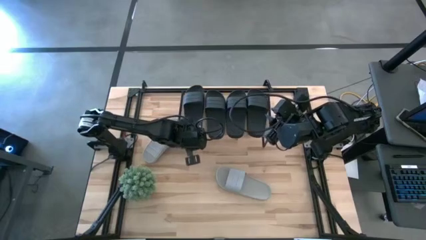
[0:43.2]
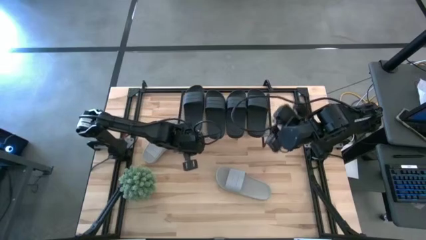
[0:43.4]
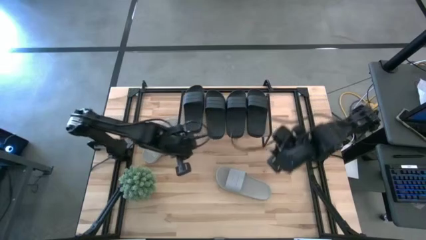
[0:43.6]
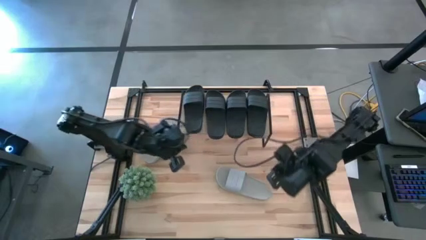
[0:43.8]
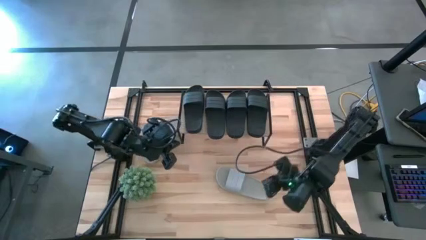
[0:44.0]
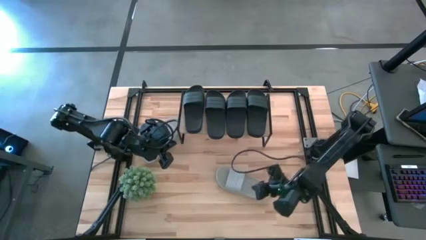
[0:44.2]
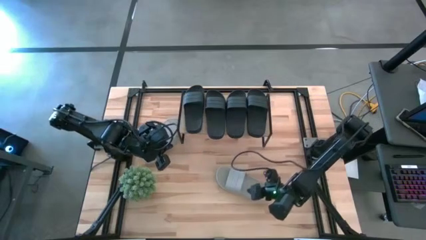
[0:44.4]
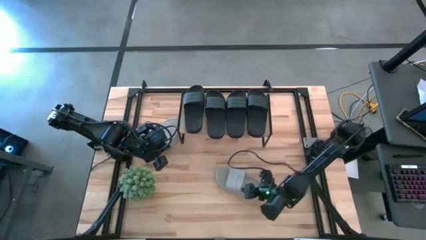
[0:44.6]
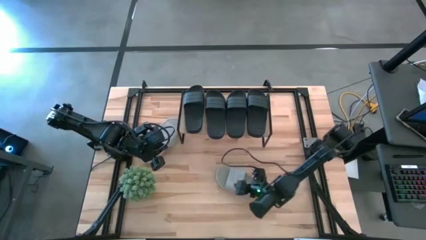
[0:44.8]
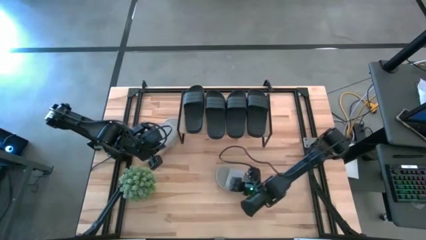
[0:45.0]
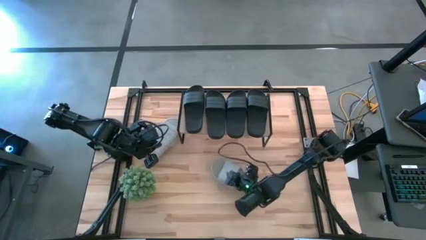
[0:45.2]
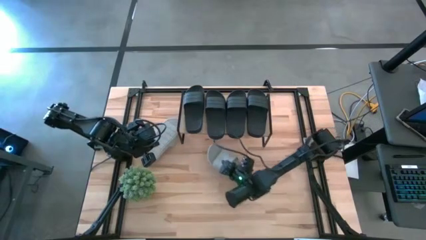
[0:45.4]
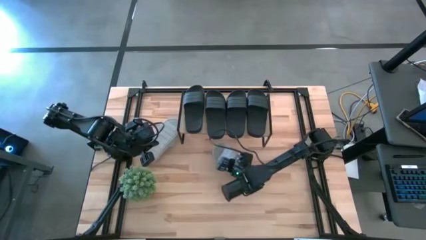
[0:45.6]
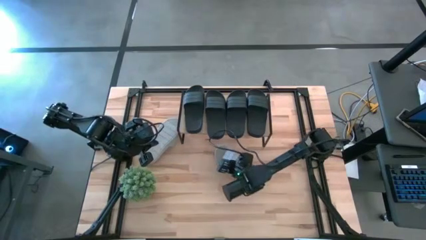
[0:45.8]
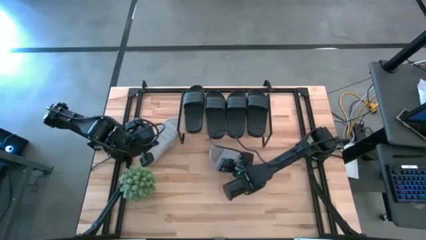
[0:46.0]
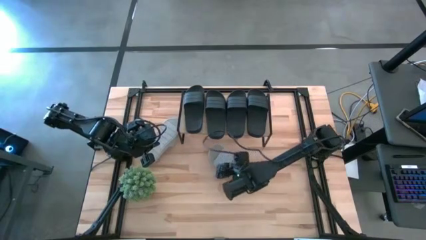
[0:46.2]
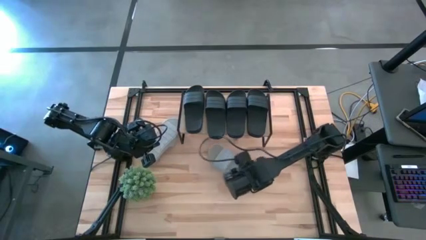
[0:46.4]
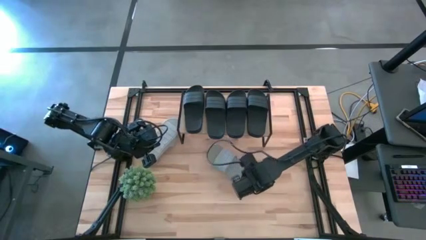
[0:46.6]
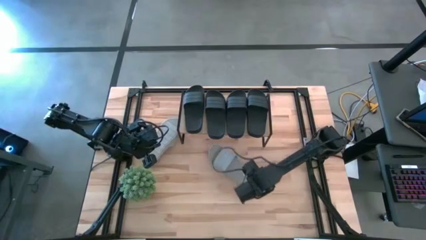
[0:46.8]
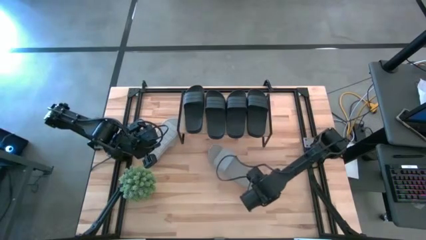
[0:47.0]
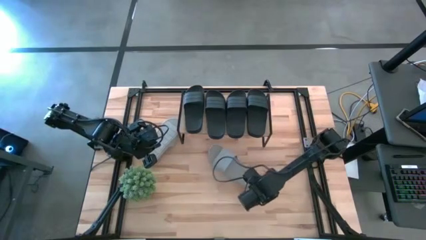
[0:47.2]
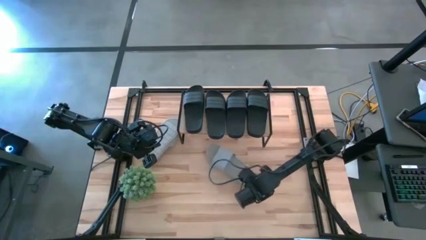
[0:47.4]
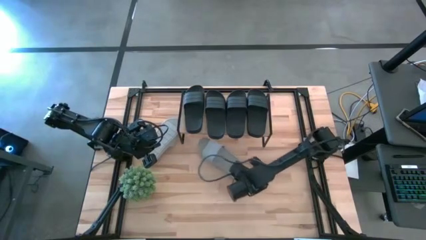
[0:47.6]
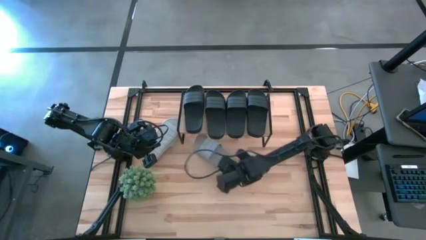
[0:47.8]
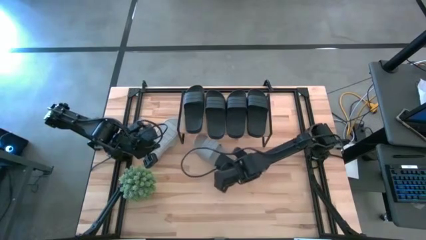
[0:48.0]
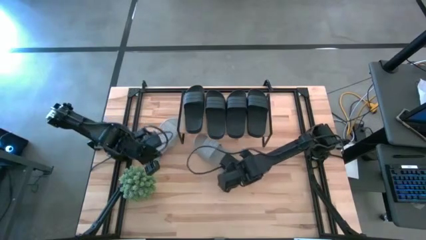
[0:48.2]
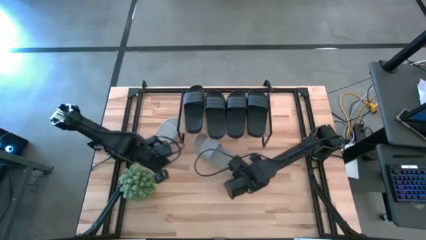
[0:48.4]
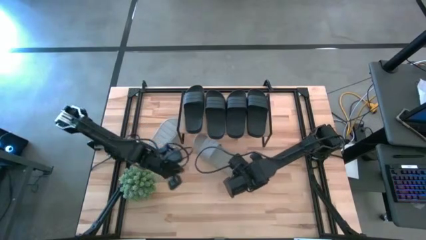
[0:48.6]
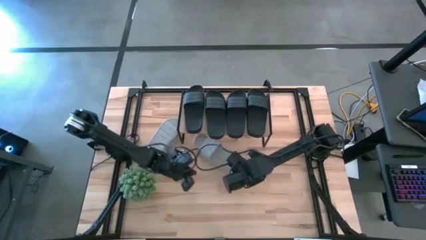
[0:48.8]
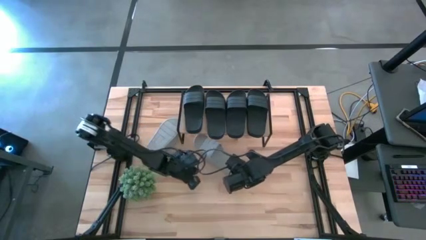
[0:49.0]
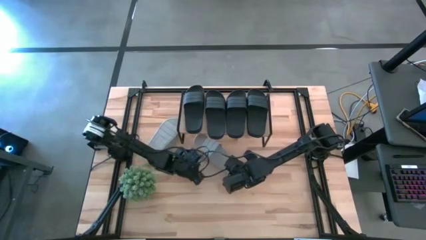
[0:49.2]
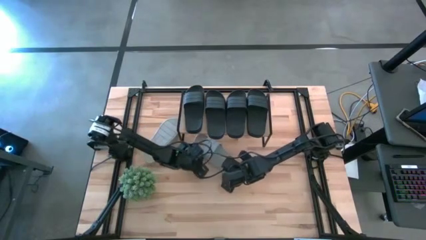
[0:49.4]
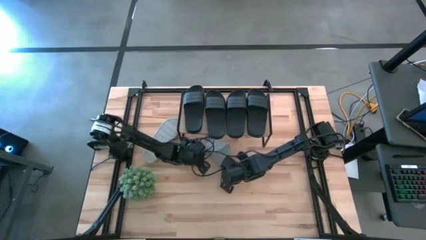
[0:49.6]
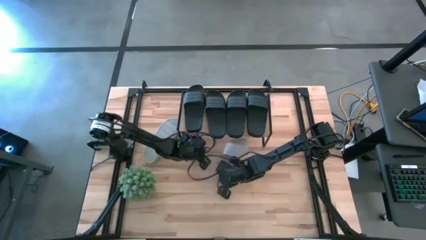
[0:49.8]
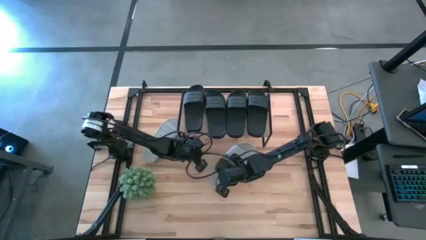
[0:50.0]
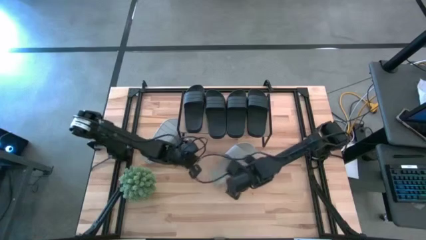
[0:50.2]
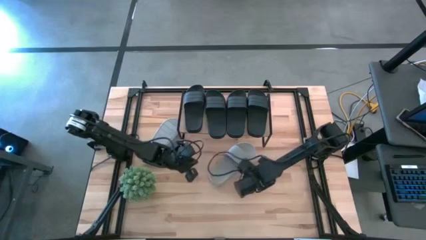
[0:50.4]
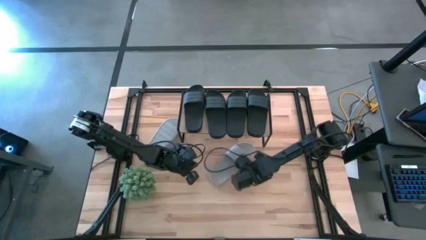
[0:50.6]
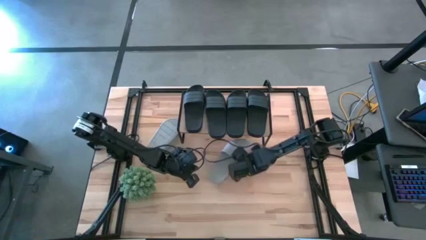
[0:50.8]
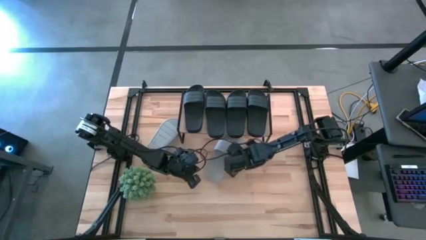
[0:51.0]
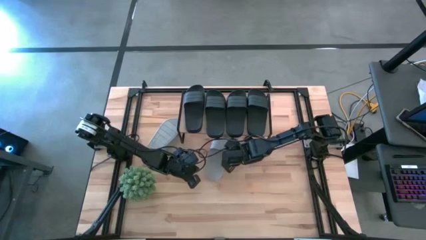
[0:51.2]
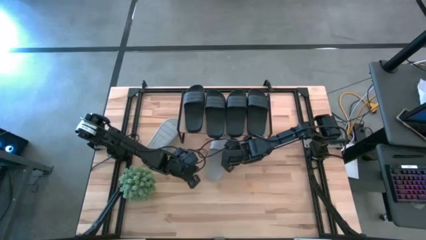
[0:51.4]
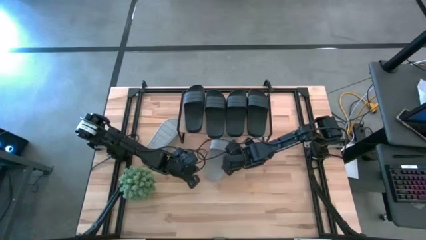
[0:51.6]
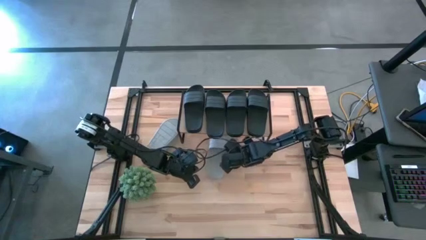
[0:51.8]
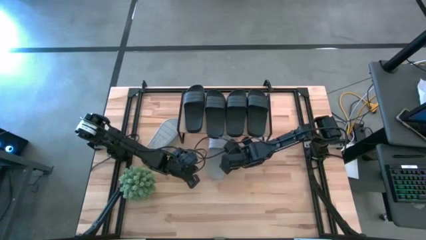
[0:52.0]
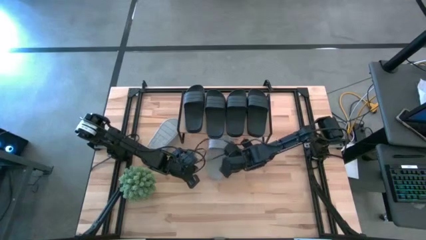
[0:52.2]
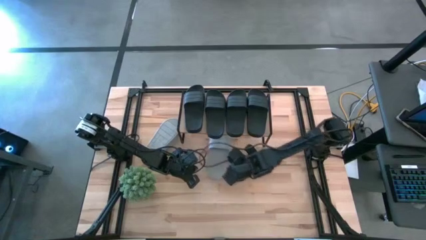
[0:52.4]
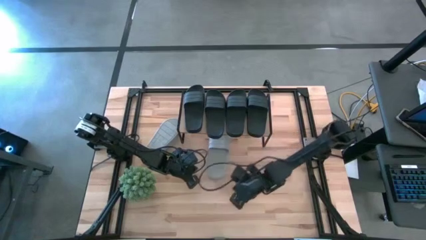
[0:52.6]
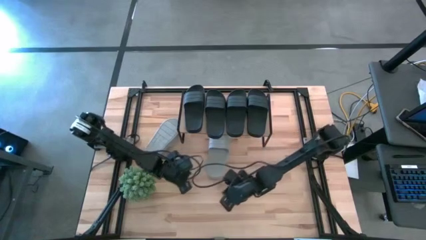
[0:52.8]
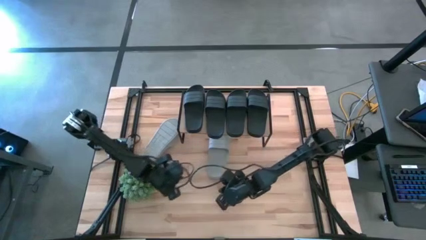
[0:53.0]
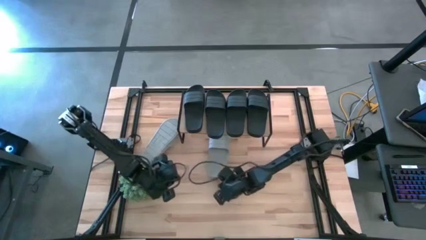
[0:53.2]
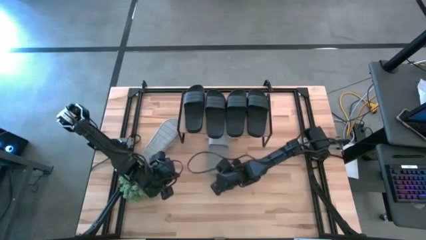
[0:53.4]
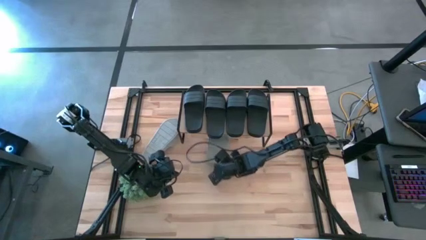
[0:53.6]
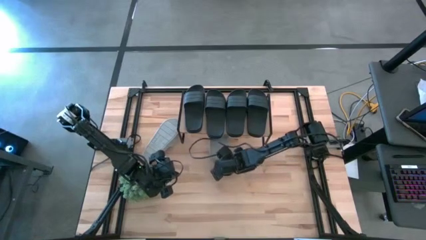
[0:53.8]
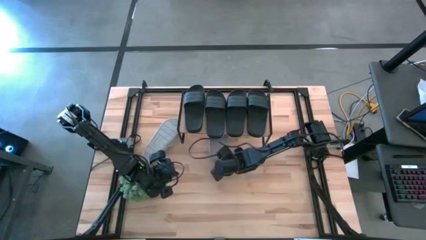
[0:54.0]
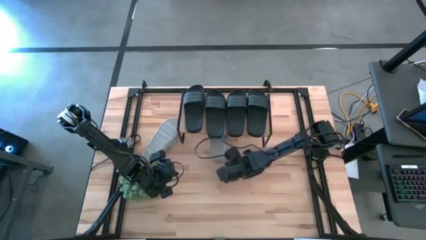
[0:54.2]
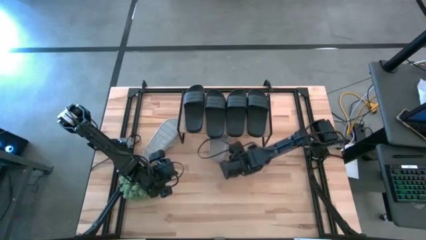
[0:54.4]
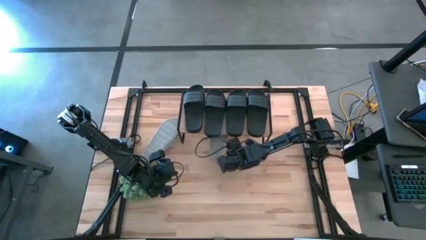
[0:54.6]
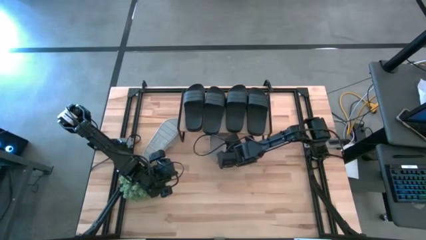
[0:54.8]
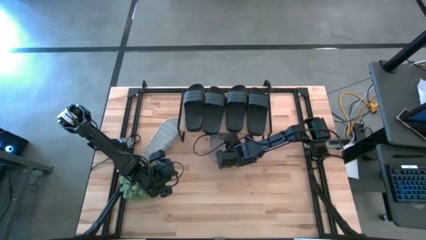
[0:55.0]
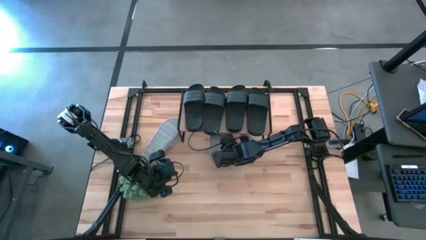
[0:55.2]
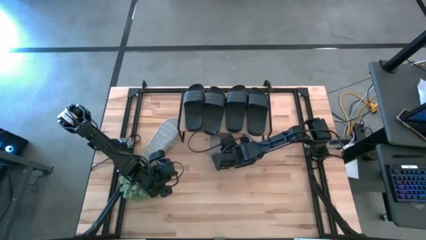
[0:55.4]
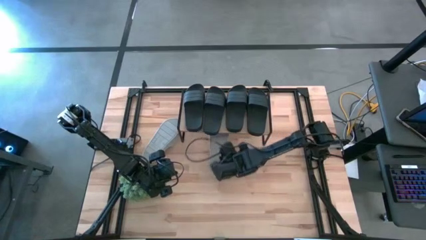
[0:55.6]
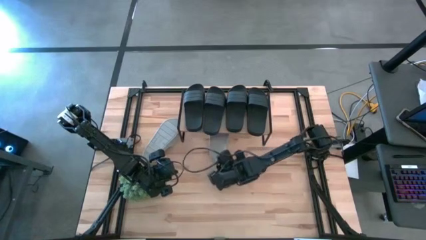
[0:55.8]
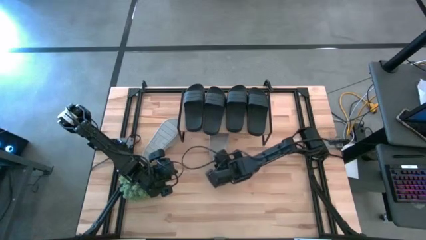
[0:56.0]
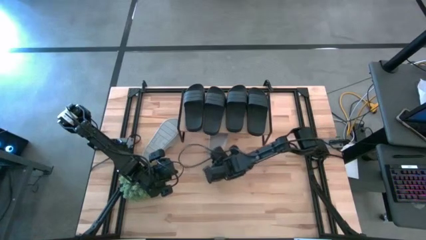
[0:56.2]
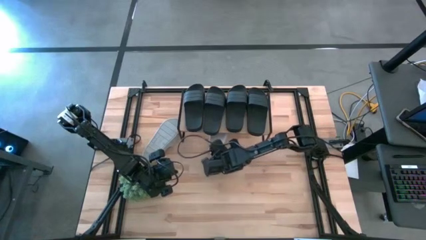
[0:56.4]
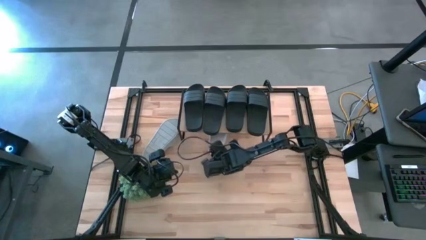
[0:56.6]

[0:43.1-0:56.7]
Task: Pick and place slides into the shelf
Put the right gray slipper under the shelf
